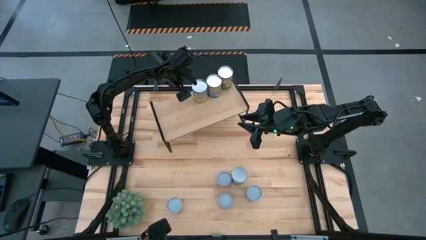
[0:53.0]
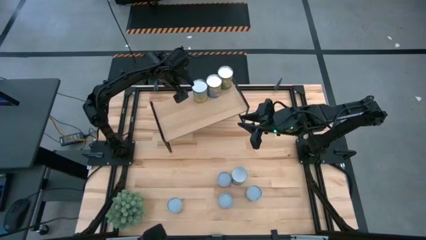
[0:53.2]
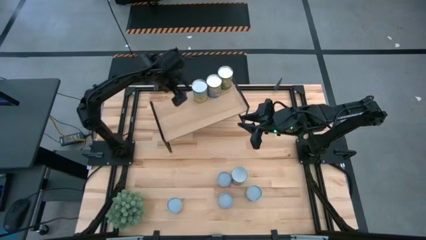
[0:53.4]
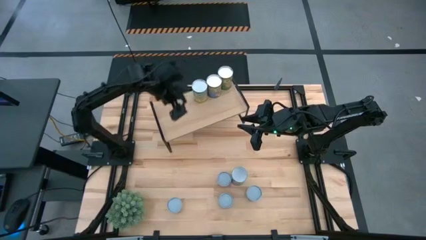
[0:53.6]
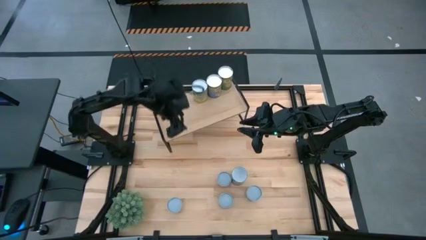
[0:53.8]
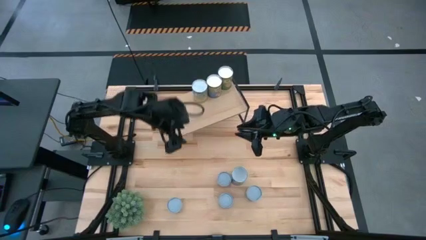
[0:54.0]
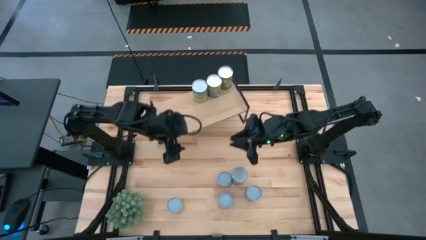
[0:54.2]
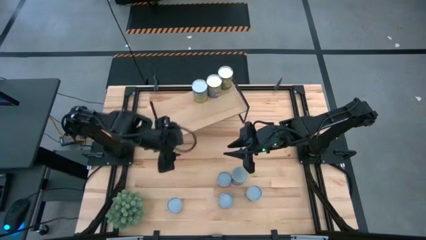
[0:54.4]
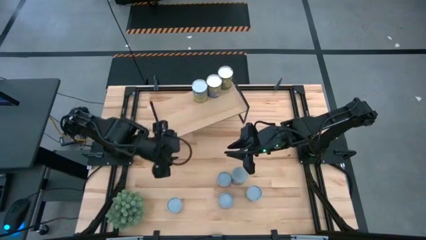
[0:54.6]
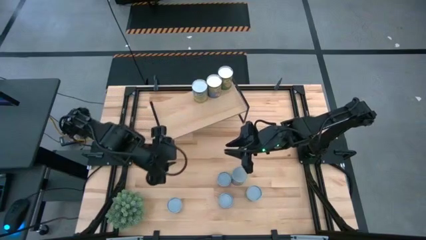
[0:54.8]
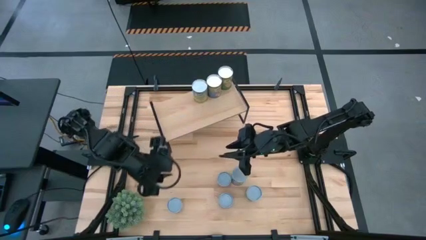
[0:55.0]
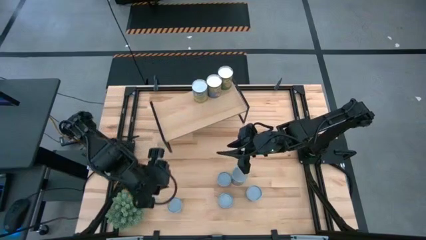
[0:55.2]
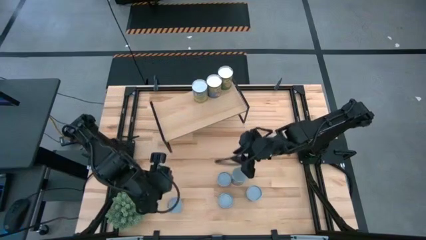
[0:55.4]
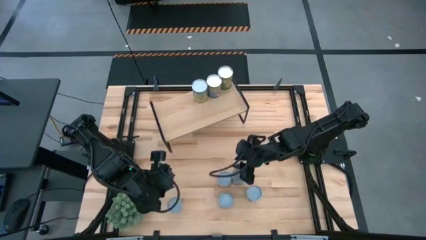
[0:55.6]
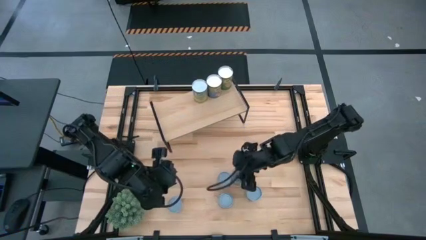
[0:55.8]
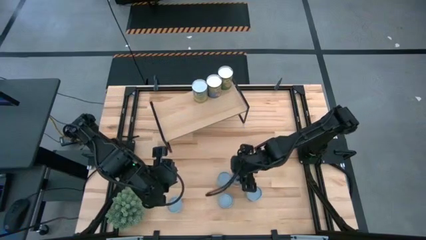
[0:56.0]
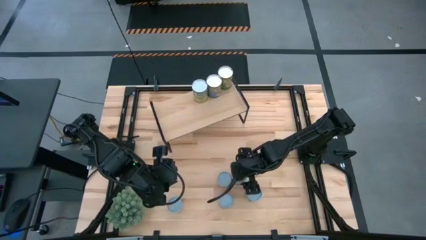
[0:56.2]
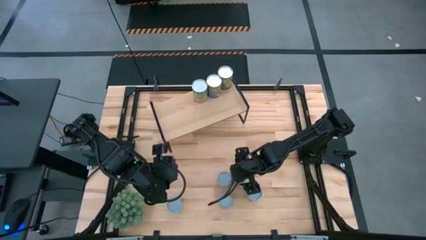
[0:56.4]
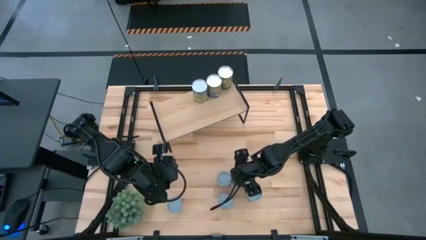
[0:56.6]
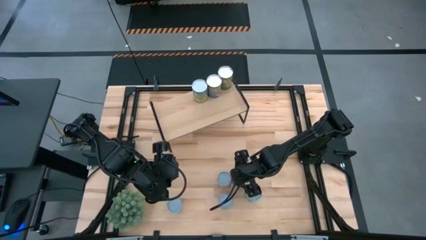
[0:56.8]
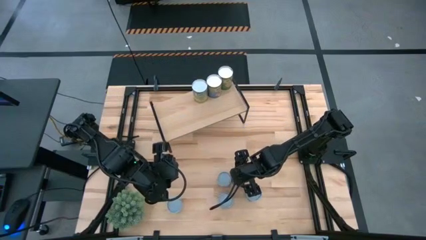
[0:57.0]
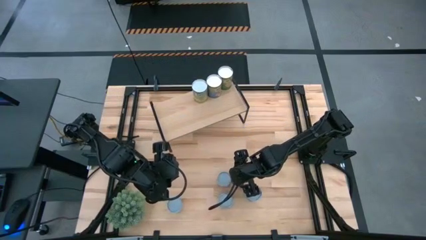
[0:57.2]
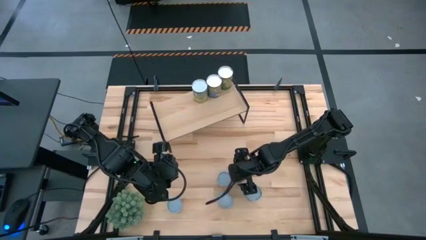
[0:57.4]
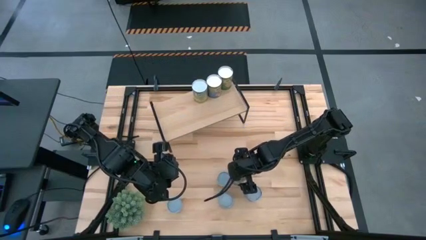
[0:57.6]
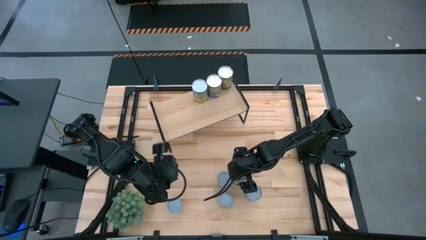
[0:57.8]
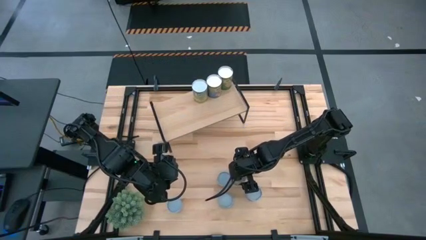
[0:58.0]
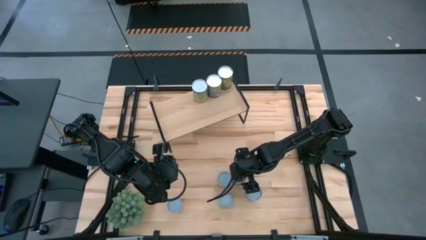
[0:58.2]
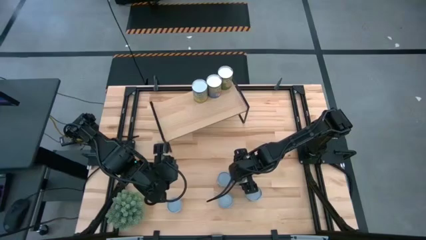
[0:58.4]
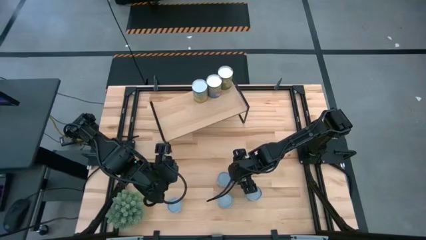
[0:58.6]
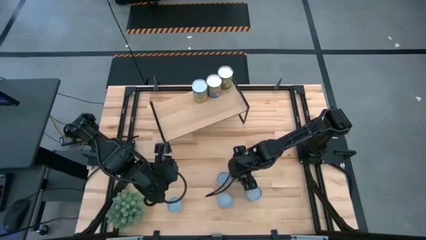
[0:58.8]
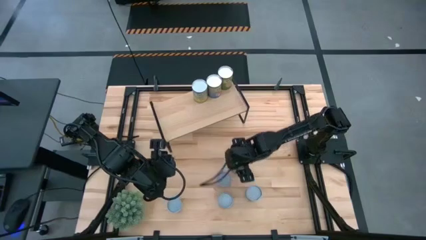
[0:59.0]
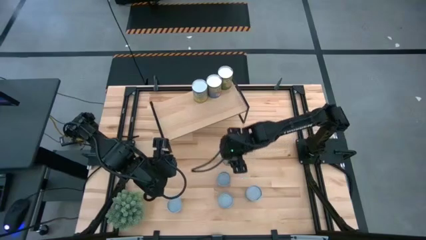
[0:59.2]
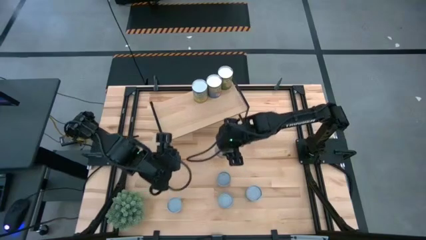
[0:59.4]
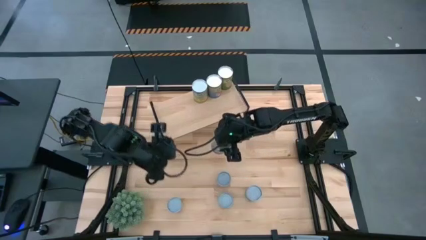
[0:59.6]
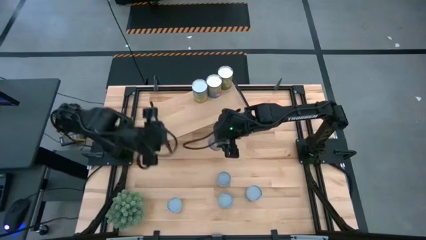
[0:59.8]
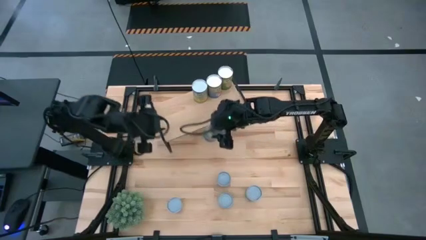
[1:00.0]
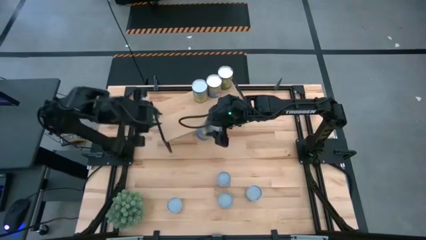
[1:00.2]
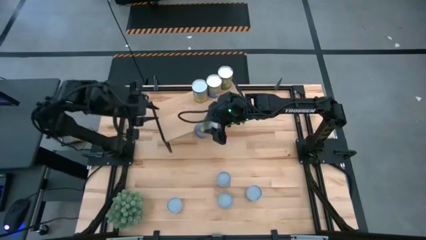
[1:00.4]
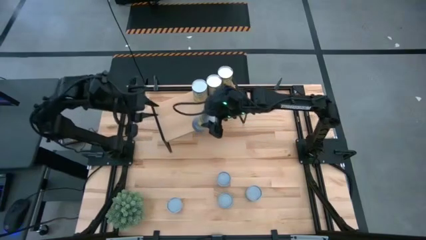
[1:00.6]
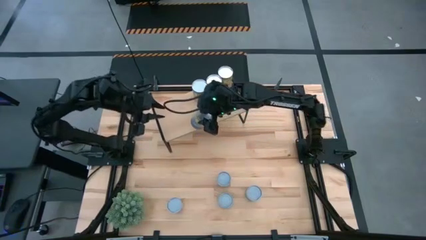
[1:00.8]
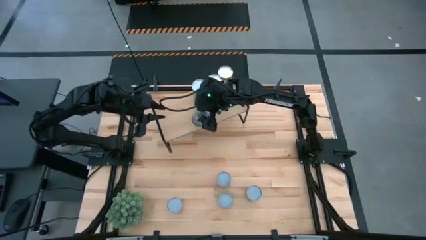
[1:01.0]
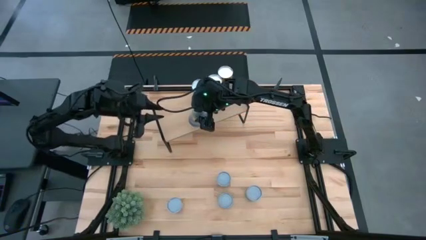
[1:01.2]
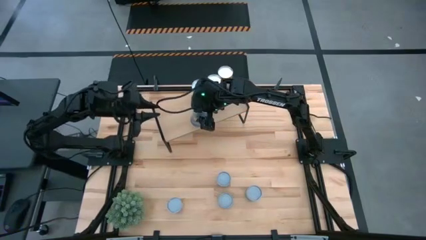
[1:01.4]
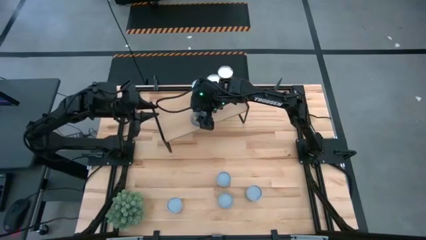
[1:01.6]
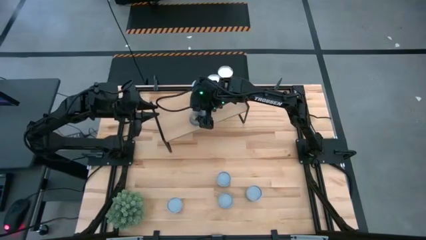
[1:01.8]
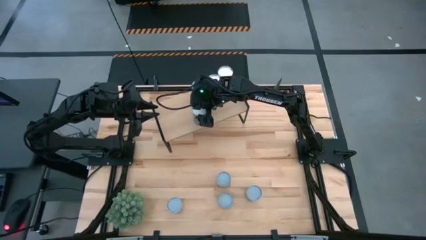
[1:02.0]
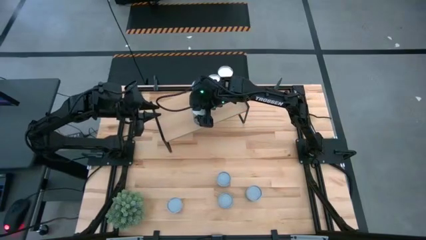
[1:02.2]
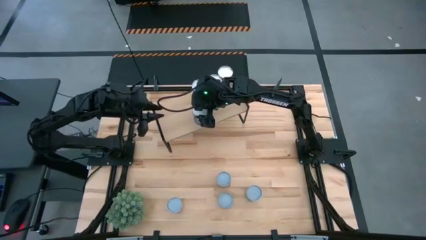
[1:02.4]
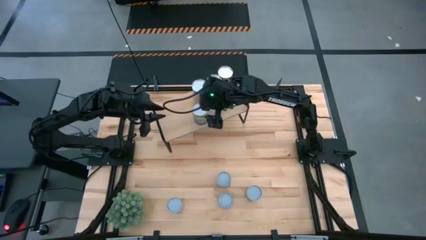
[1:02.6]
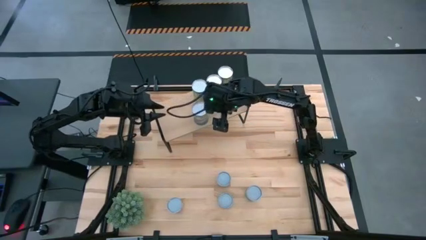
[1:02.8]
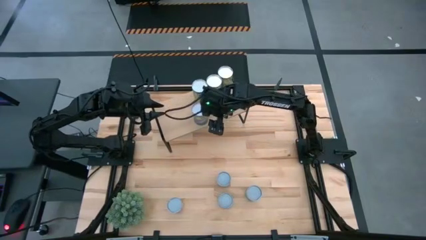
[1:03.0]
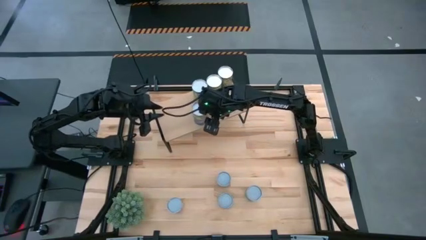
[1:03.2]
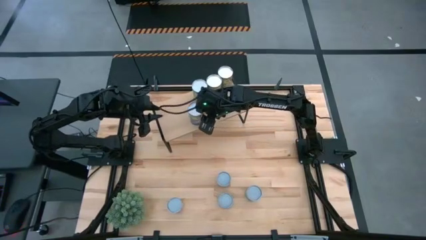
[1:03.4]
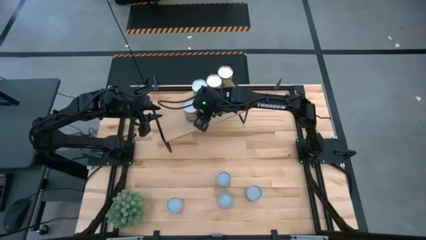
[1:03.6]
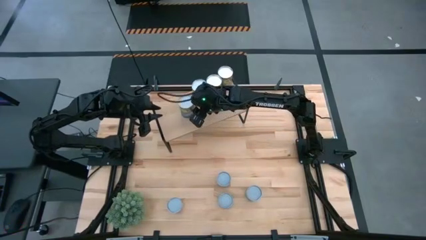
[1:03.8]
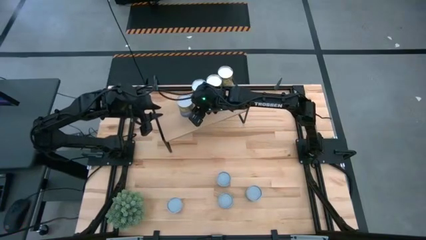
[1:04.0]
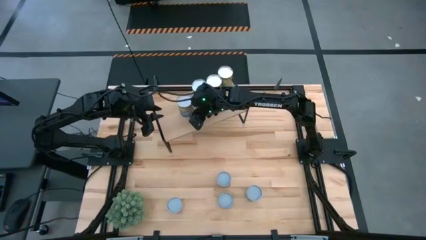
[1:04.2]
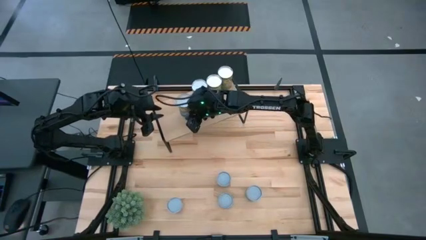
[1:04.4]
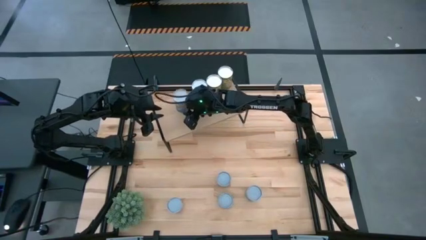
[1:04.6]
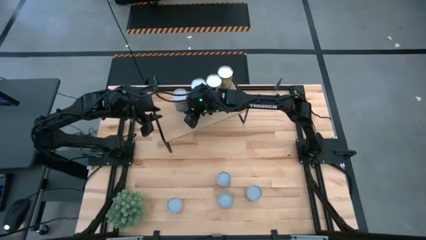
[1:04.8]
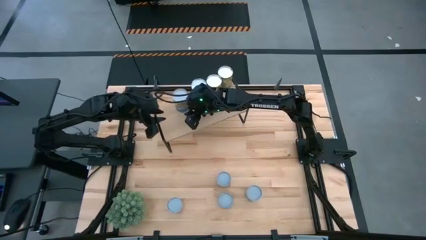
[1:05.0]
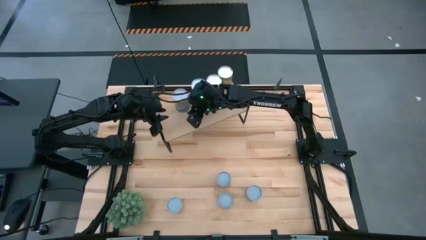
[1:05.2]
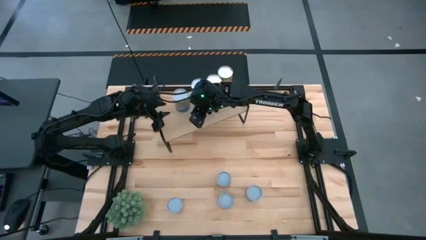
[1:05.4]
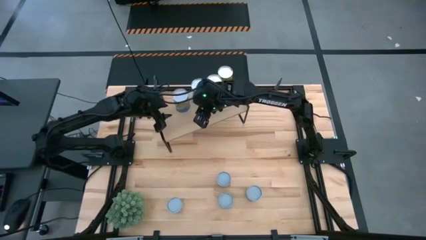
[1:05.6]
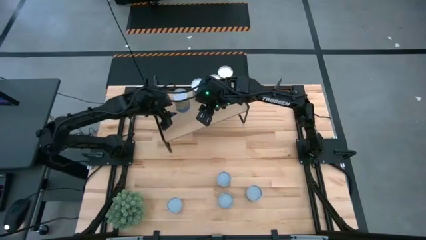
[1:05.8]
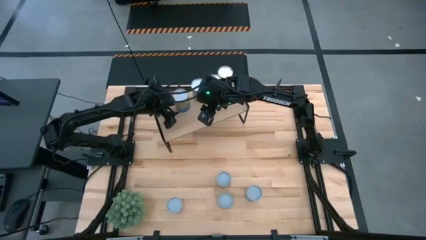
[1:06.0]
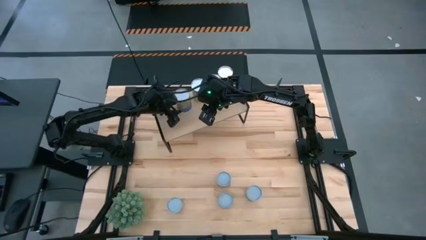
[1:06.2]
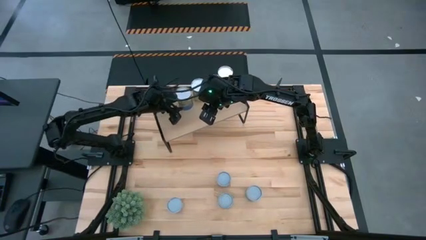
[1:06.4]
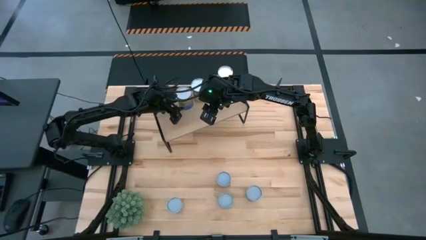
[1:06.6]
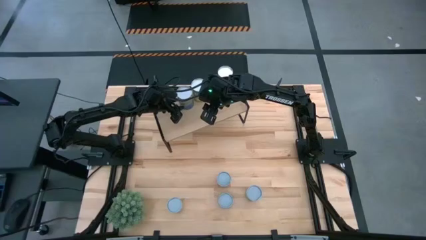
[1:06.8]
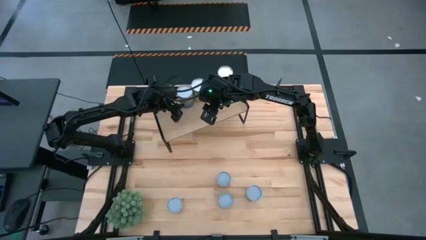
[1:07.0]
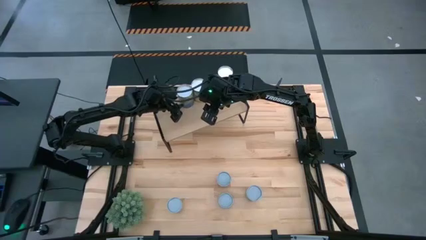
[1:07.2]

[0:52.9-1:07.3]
Task: Pick and place cans onto a shelf
Put the large canned peas on the shelf
